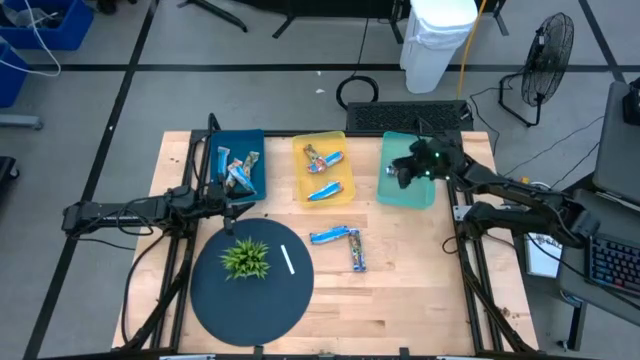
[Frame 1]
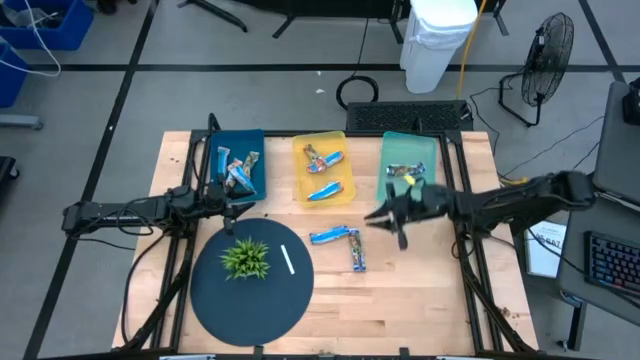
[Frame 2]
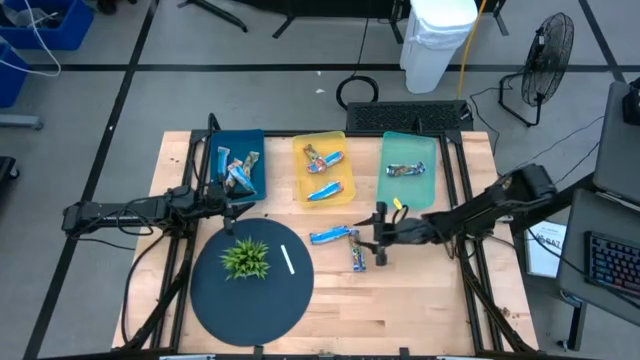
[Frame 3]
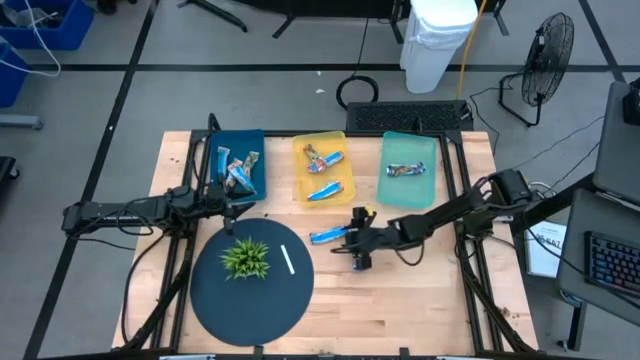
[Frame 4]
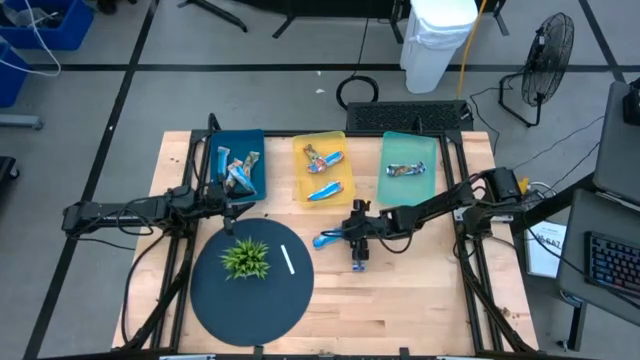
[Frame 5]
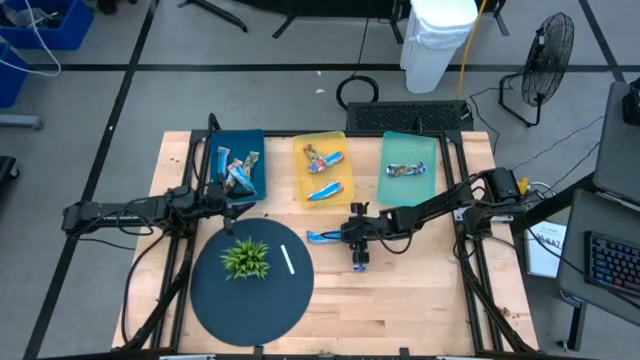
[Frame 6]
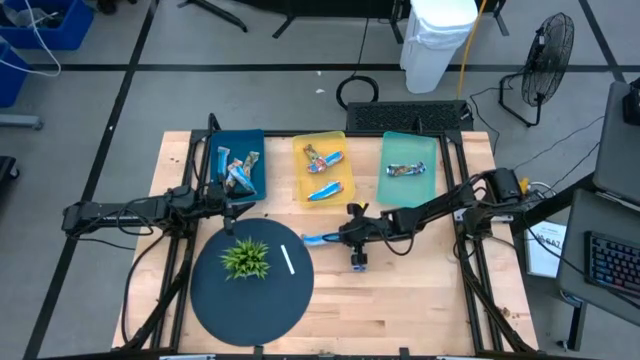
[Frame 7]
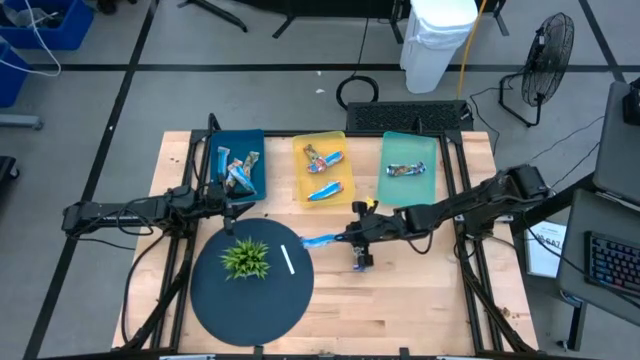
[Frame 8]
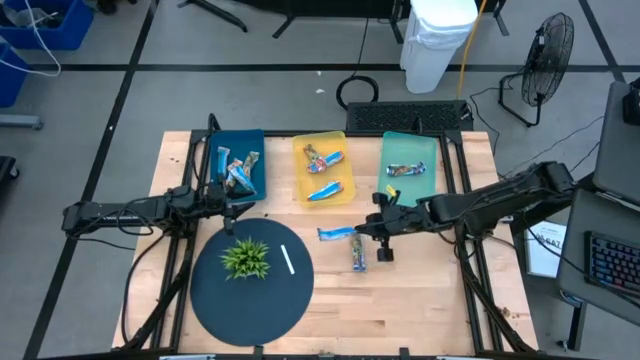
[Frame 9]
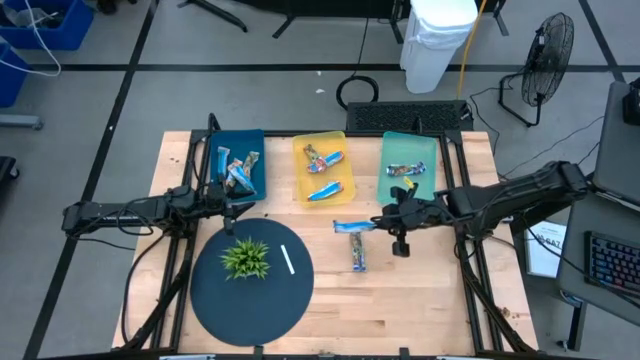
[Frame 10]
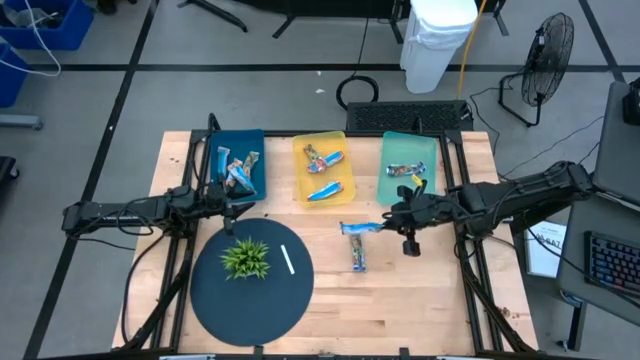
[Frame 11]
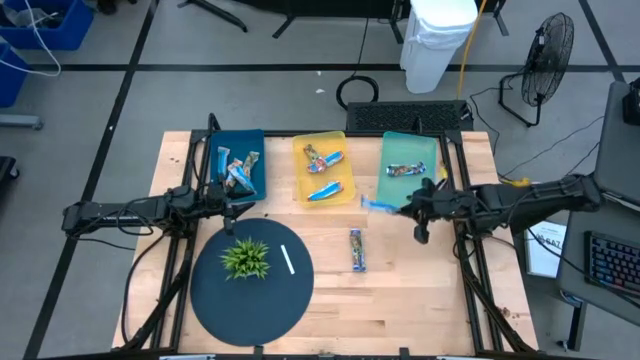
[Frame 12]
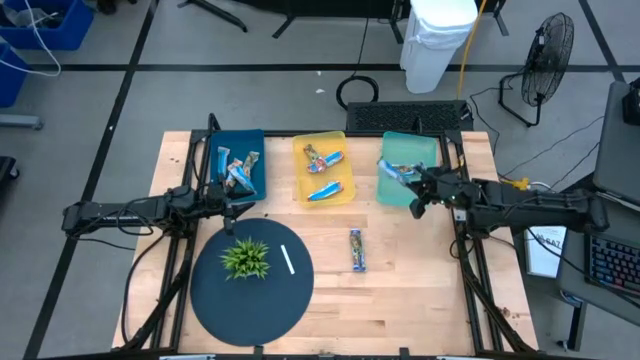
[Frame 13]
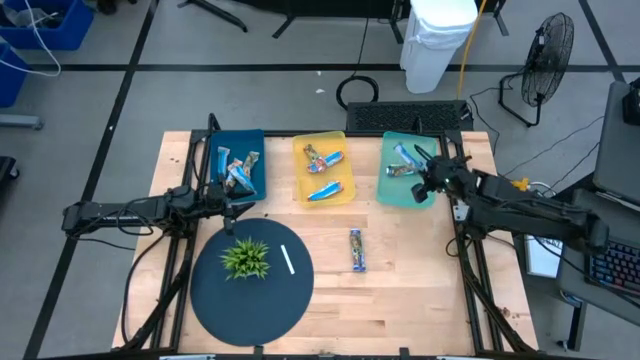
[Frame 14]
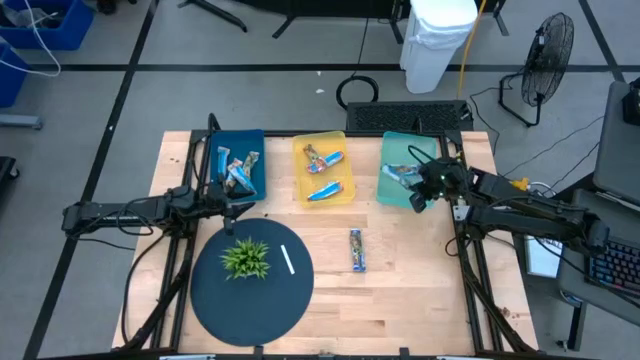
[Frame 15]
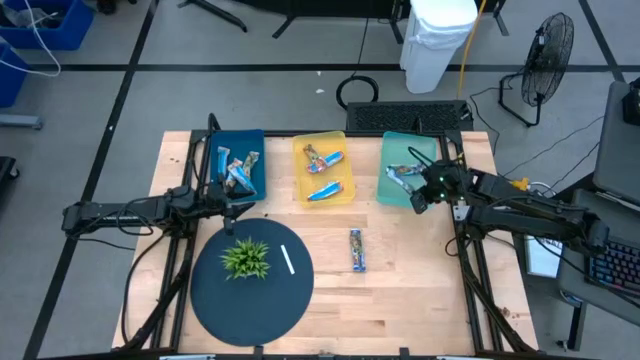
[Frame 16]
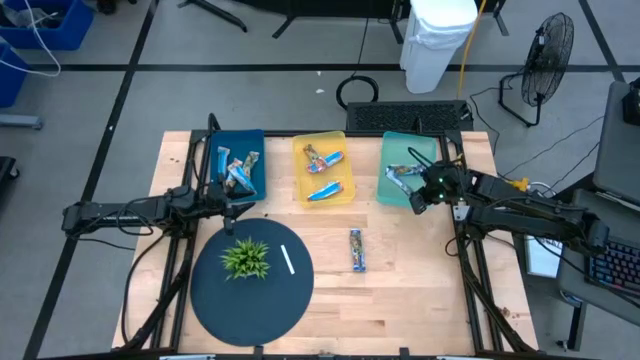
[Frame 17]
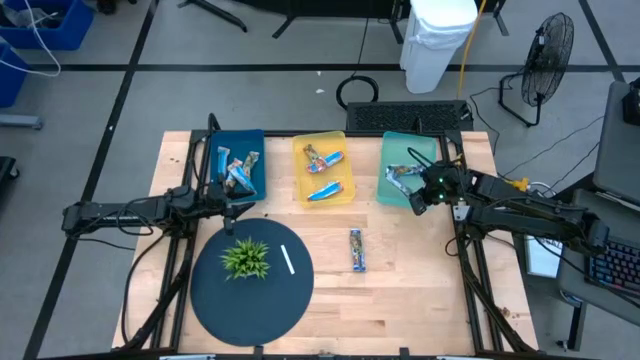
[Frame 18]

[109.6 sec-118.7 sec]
Task: Pick and place Granola Bars by type
Put the blue granola bar into the green bin

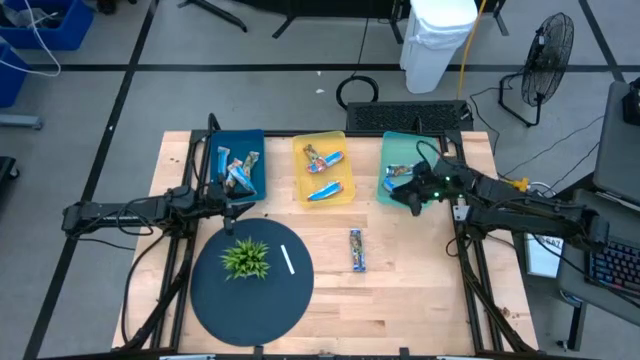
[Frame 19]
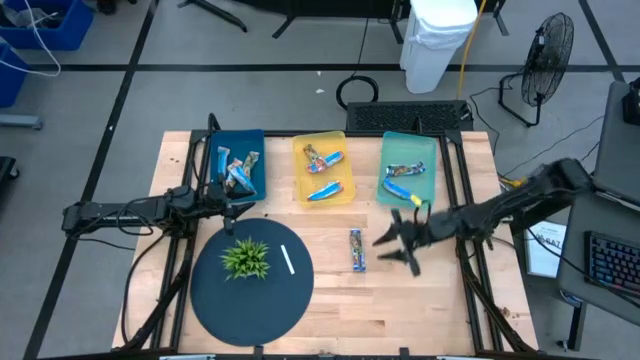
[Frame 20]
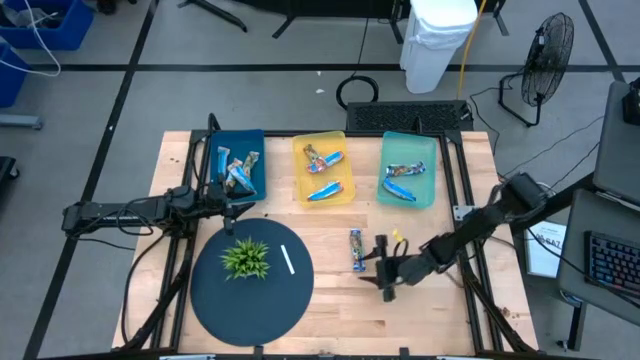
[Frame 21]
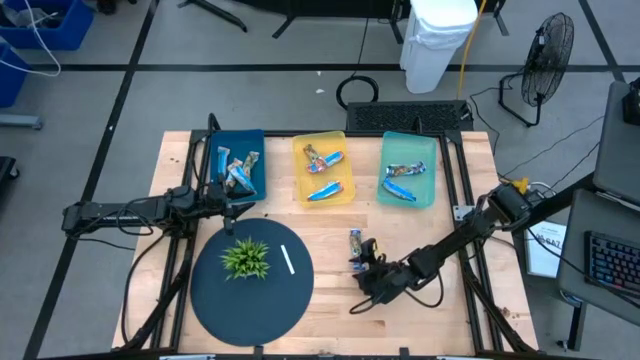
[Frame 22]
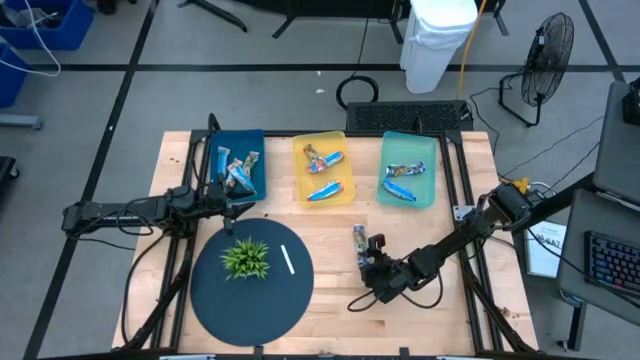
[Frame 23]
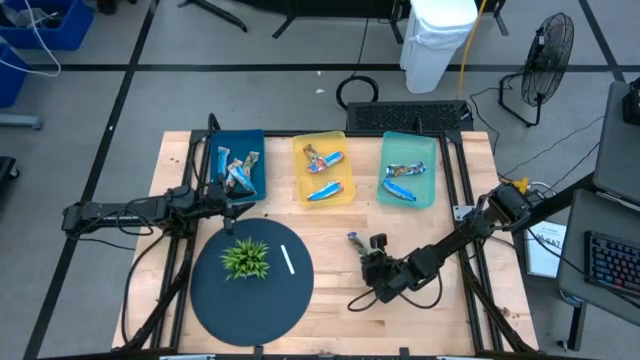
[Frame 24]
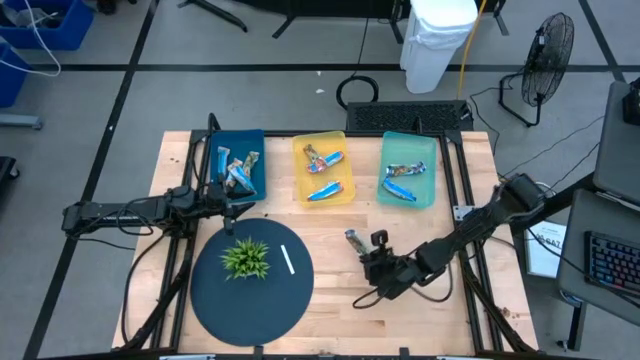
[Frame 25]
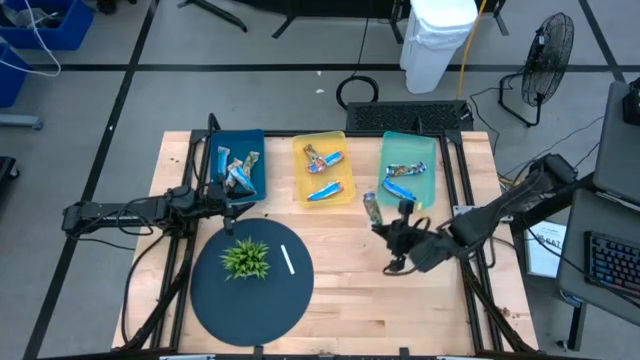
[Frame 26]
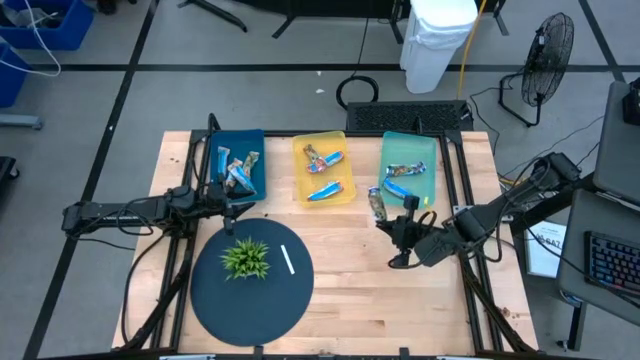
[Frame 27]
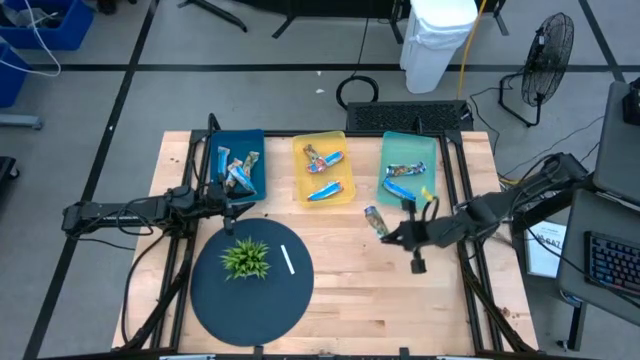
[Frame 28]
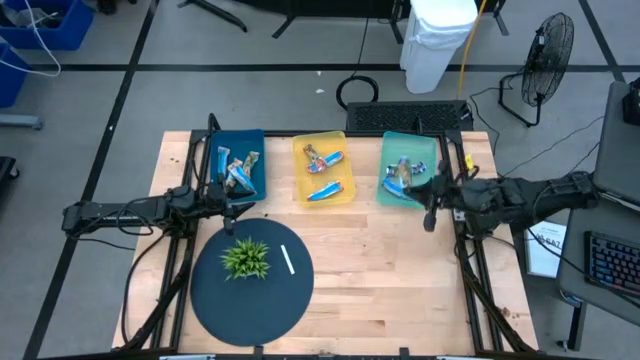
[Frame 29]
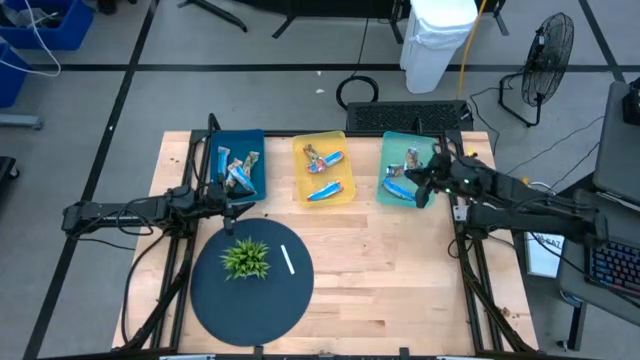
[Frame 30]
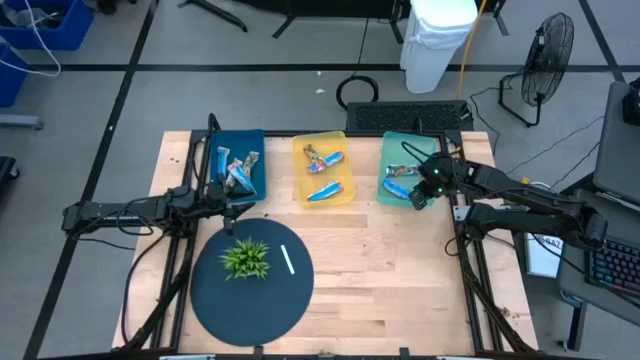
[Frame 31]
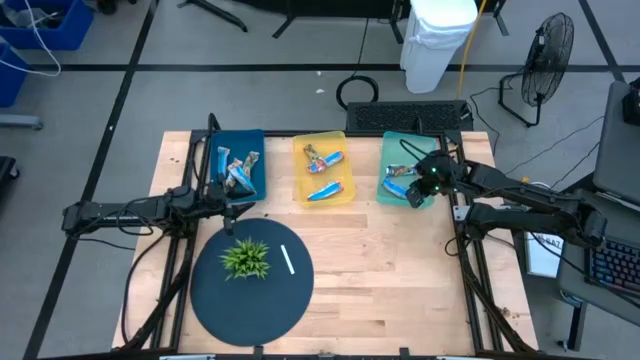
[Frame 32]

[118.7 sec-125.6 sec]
Put the blue granola bar into the green bin

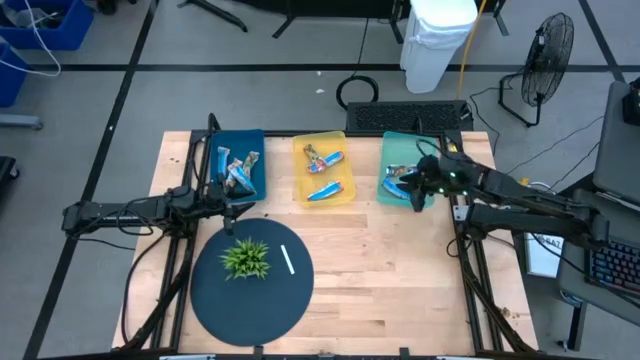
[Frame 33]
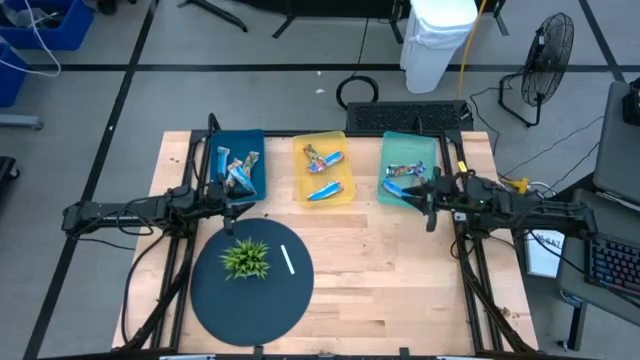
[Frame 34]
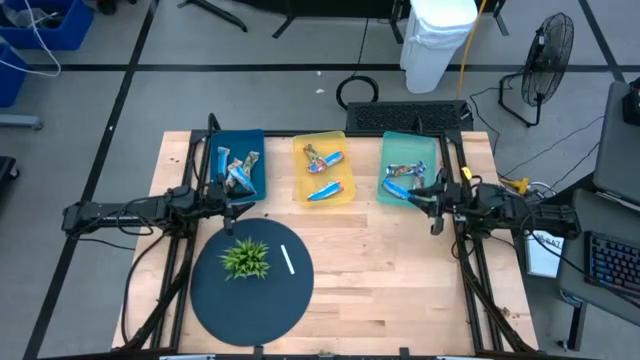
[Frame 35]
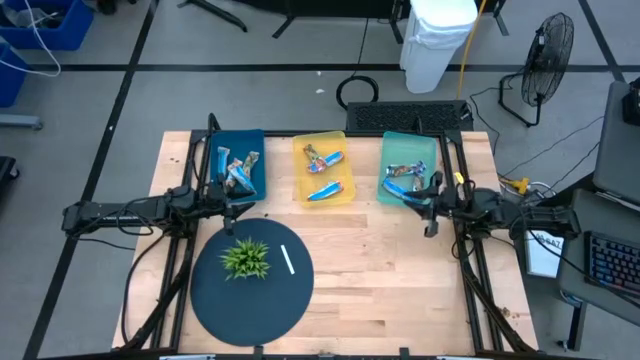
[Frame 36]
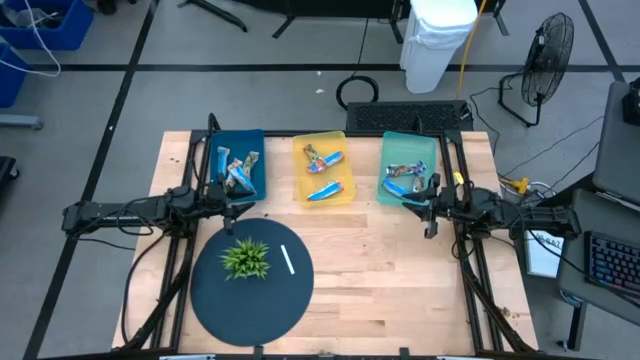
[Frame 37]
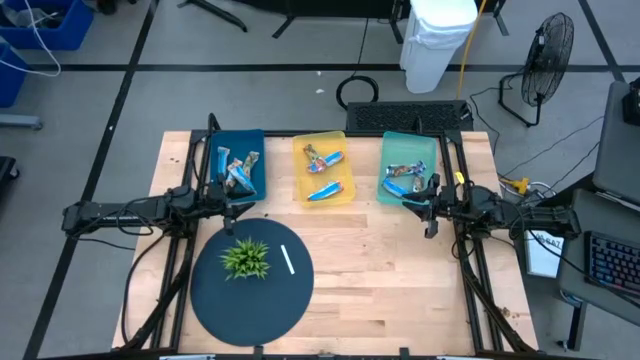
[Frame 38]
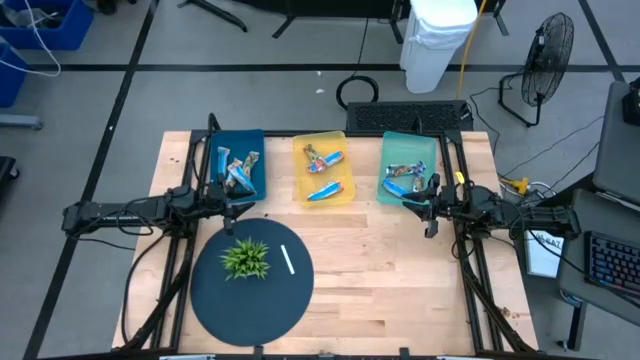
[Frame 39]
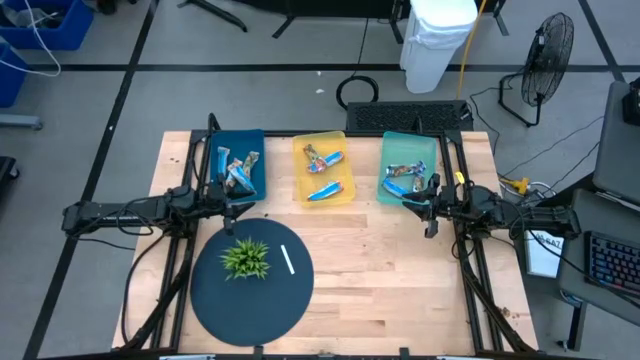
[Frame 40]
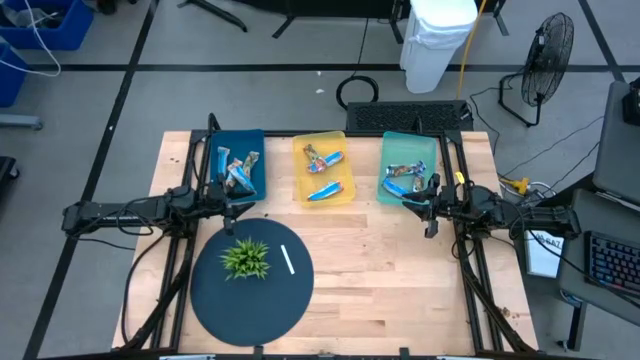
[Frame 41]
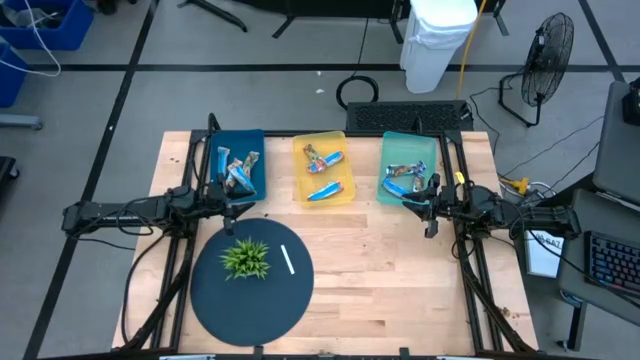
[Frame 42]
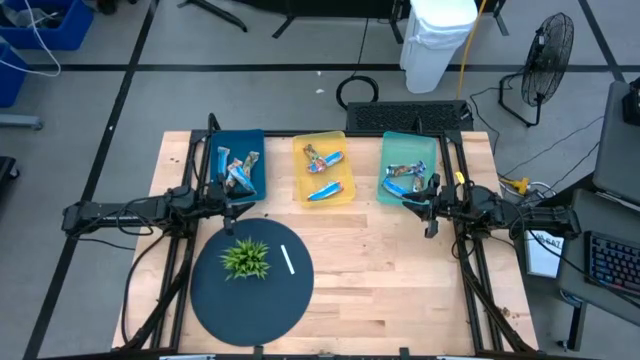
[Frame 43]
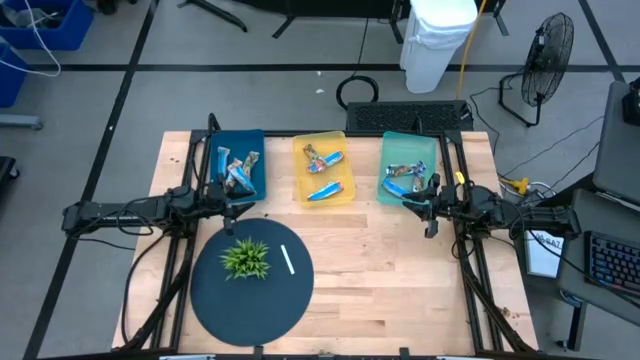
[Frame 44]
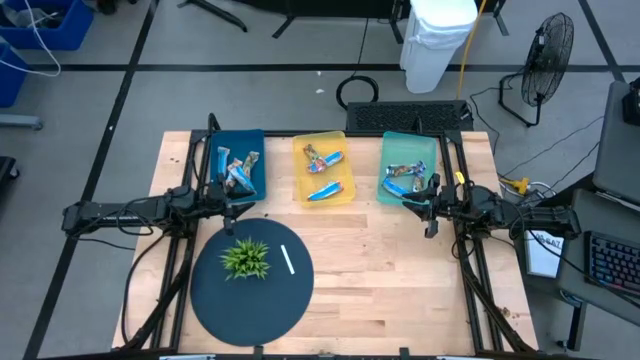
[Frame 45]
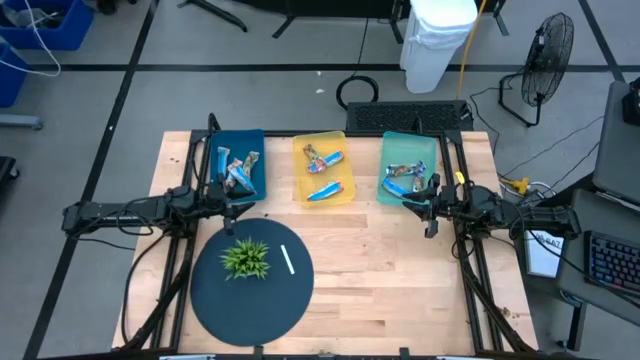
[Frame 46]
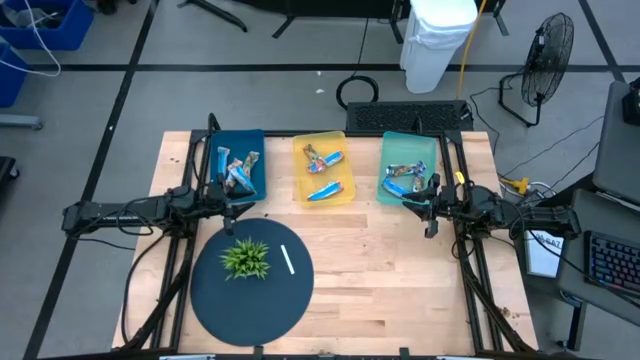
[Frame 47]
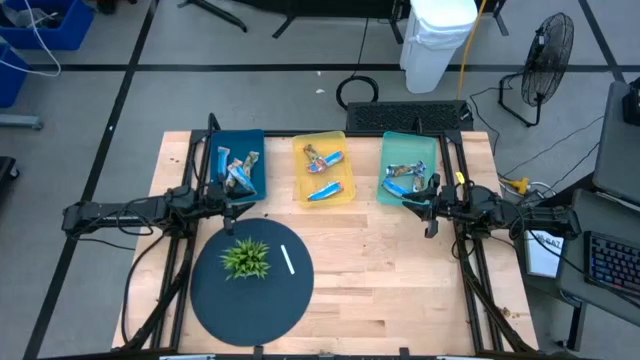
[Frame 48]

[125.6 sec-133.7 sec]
Return to Home Position
